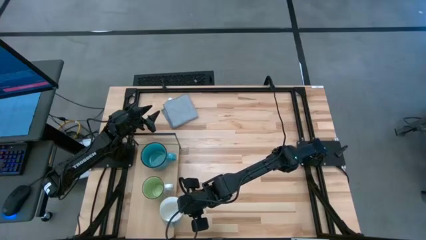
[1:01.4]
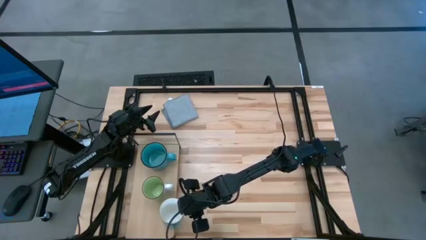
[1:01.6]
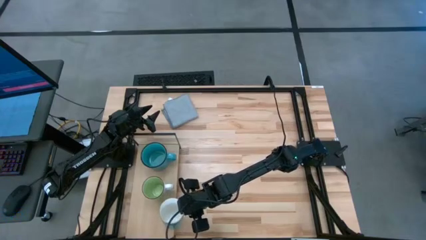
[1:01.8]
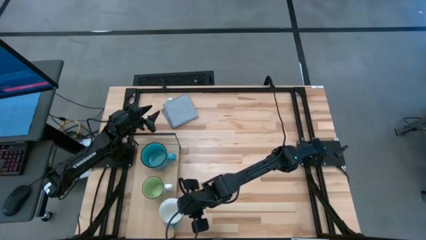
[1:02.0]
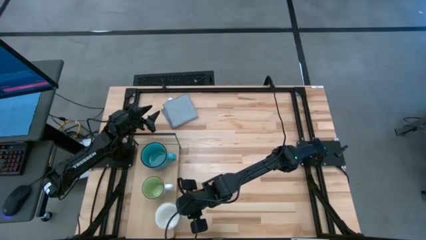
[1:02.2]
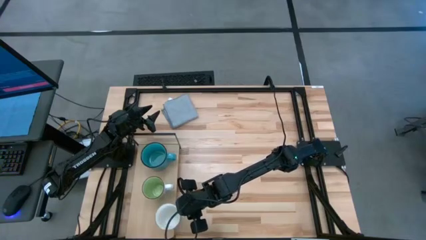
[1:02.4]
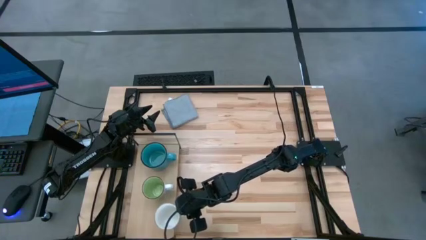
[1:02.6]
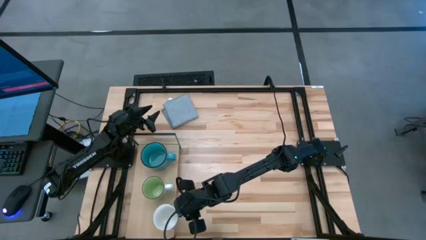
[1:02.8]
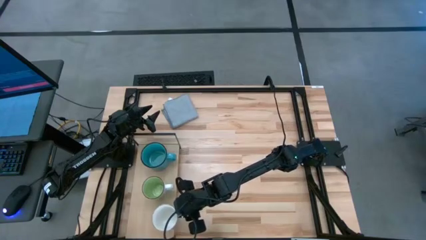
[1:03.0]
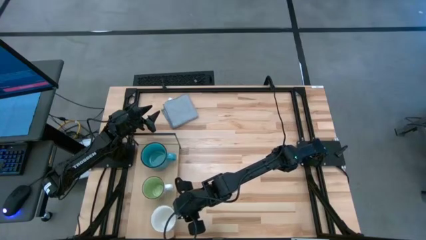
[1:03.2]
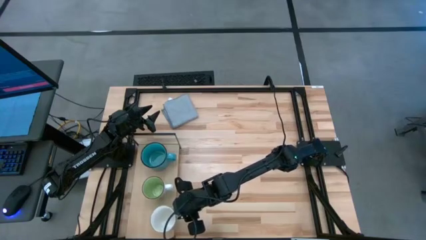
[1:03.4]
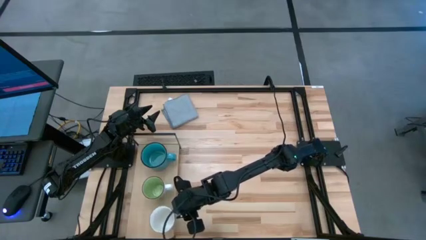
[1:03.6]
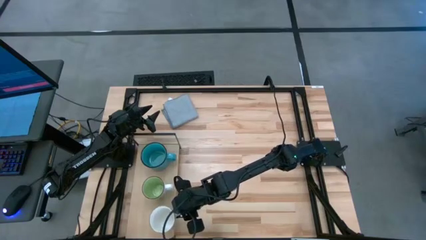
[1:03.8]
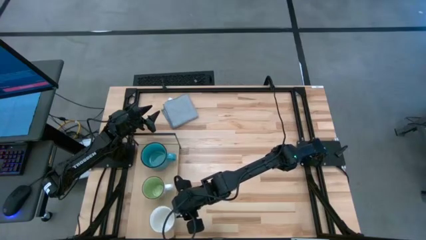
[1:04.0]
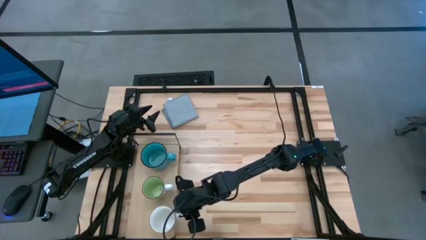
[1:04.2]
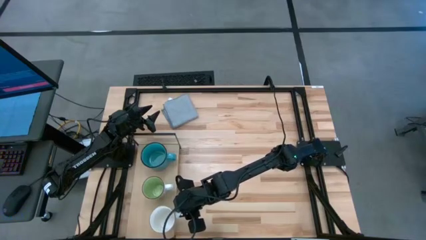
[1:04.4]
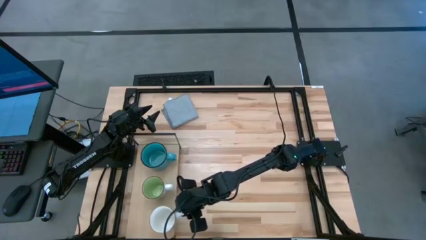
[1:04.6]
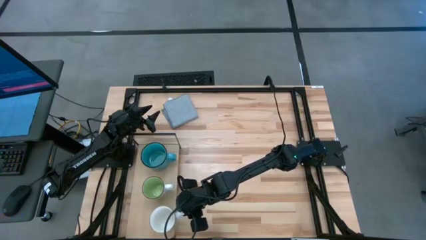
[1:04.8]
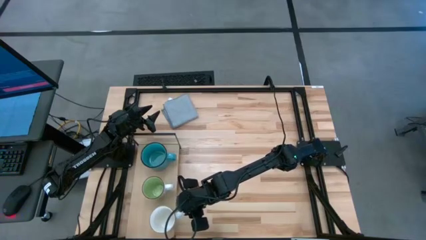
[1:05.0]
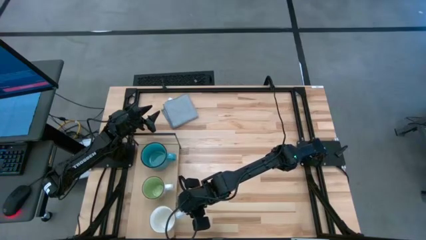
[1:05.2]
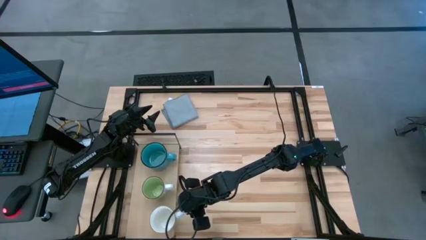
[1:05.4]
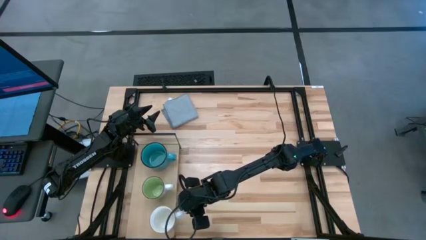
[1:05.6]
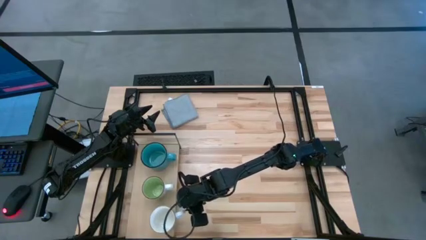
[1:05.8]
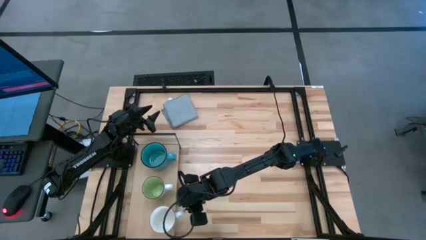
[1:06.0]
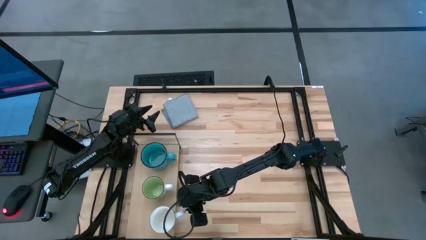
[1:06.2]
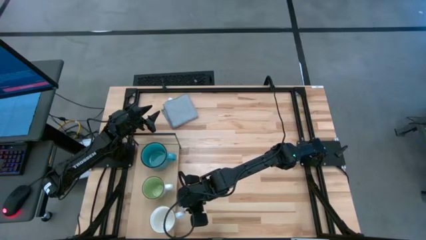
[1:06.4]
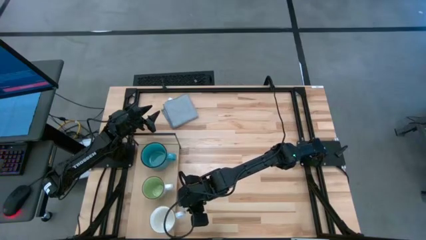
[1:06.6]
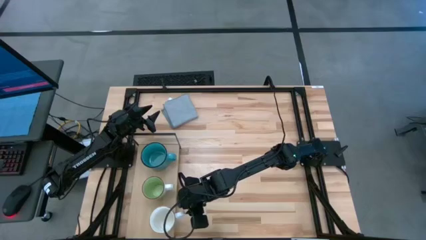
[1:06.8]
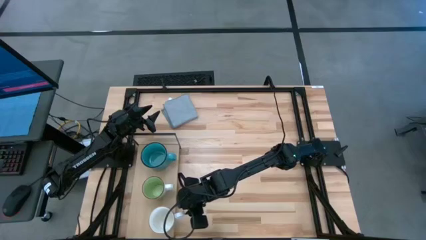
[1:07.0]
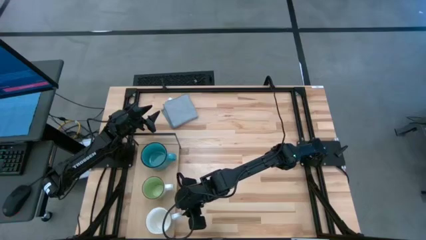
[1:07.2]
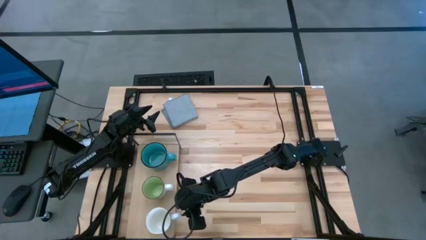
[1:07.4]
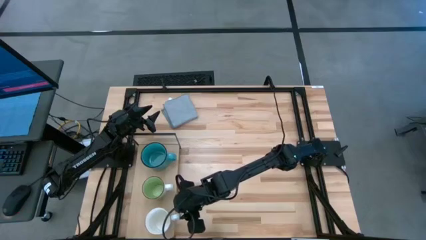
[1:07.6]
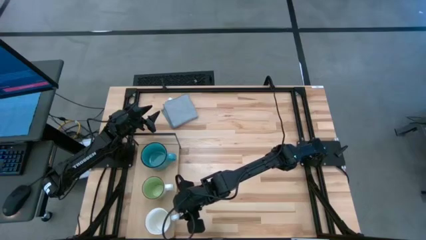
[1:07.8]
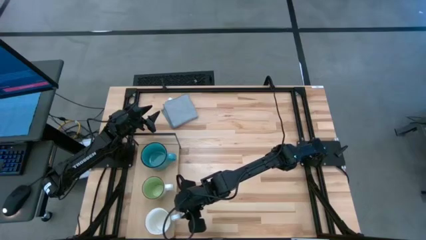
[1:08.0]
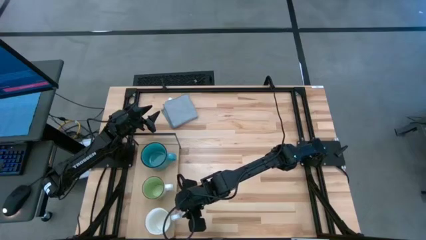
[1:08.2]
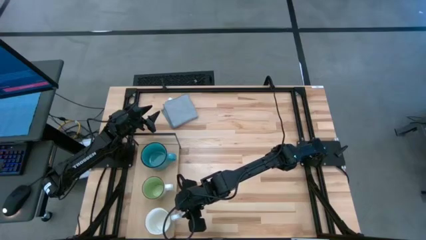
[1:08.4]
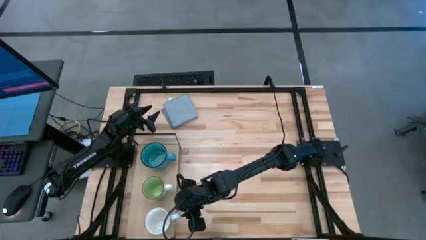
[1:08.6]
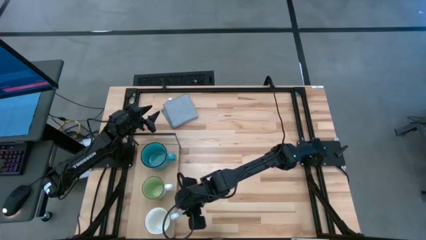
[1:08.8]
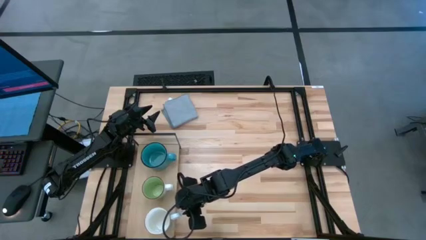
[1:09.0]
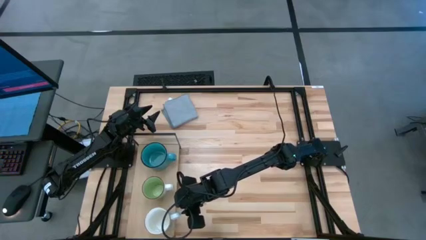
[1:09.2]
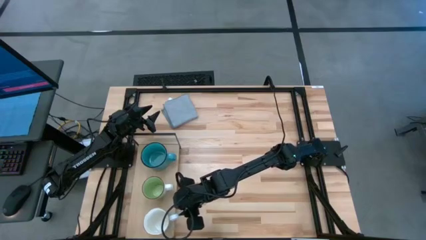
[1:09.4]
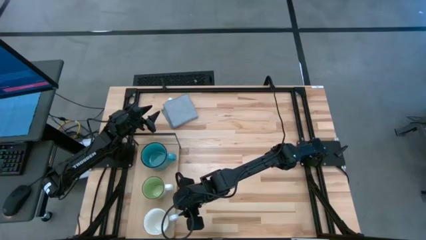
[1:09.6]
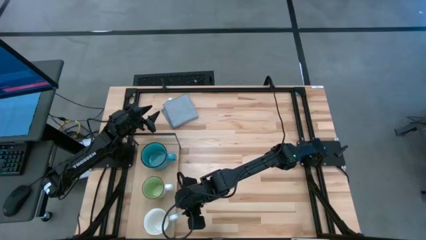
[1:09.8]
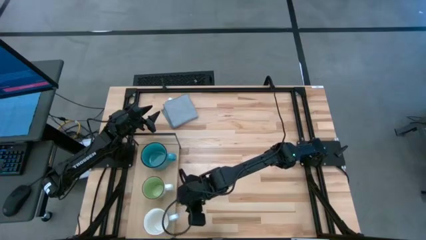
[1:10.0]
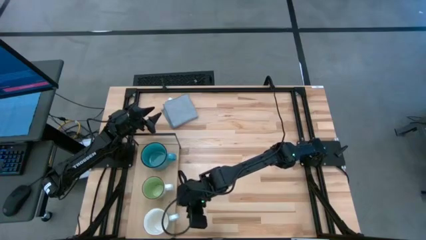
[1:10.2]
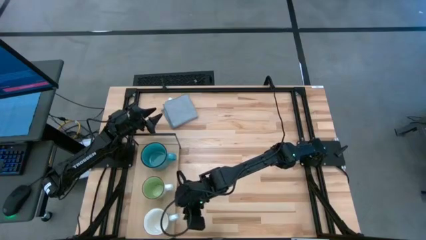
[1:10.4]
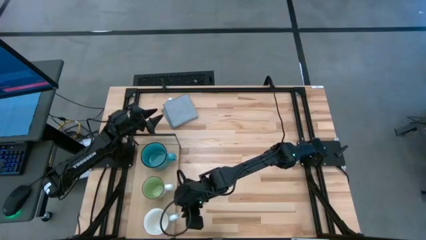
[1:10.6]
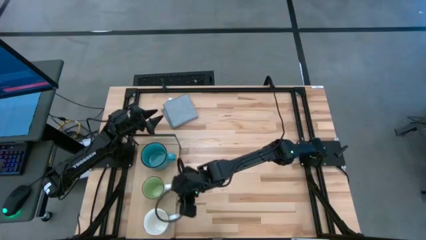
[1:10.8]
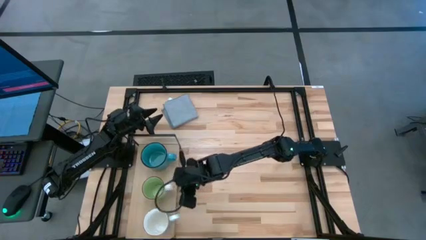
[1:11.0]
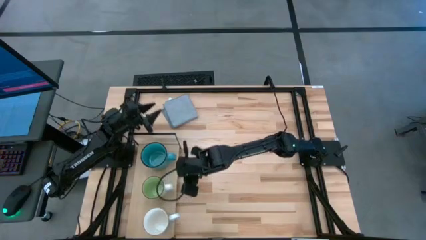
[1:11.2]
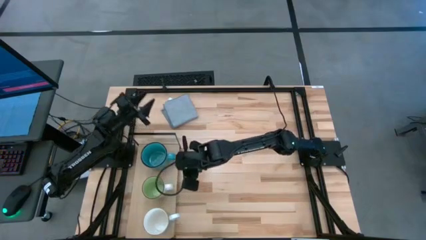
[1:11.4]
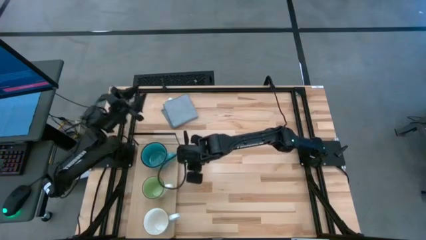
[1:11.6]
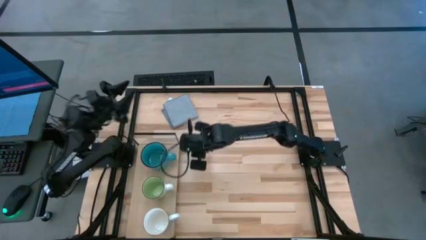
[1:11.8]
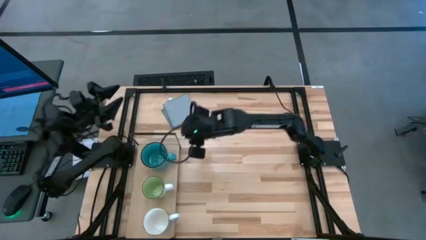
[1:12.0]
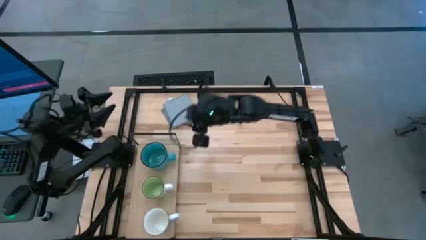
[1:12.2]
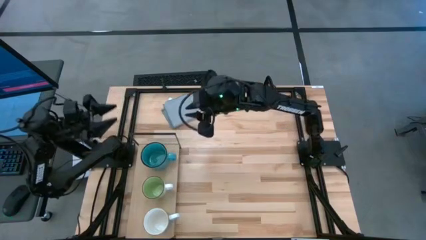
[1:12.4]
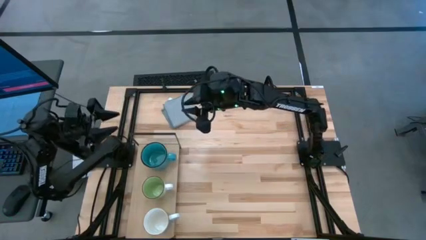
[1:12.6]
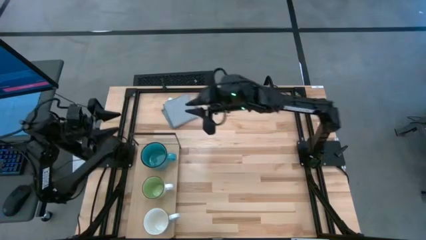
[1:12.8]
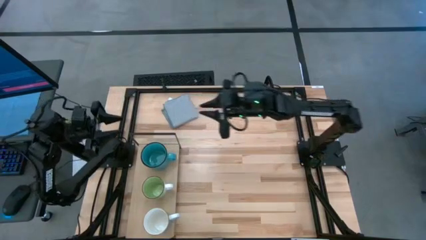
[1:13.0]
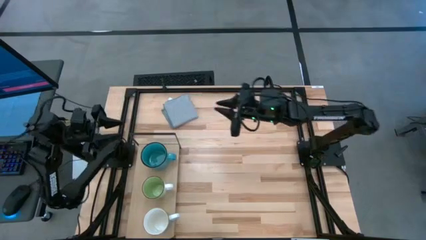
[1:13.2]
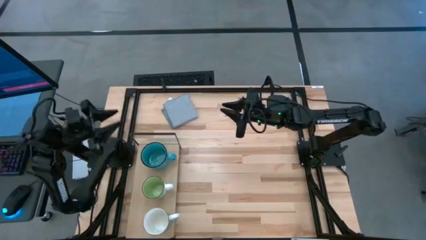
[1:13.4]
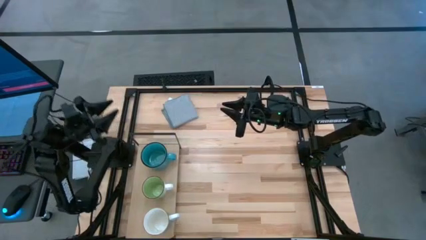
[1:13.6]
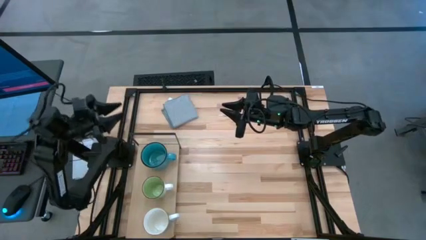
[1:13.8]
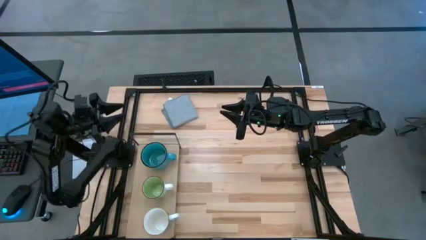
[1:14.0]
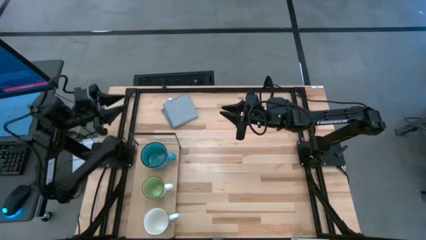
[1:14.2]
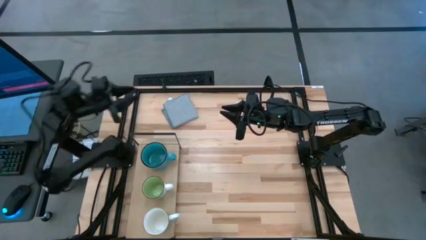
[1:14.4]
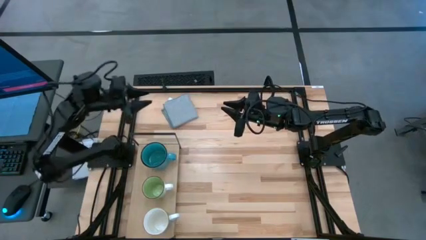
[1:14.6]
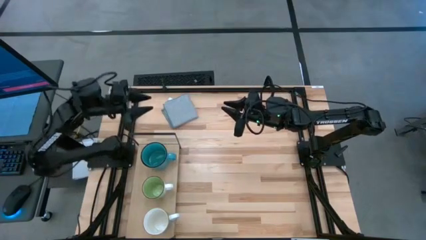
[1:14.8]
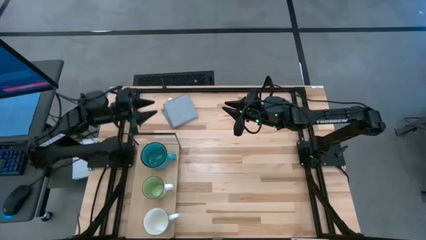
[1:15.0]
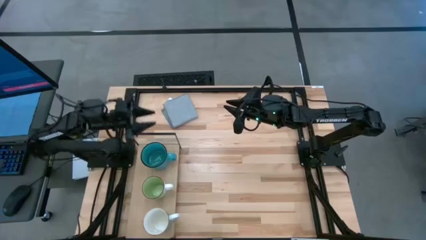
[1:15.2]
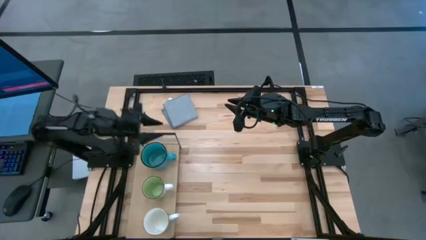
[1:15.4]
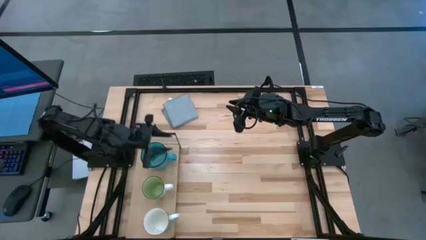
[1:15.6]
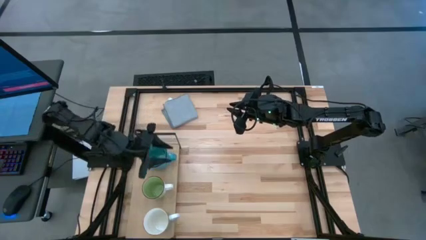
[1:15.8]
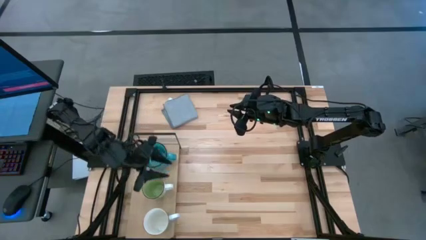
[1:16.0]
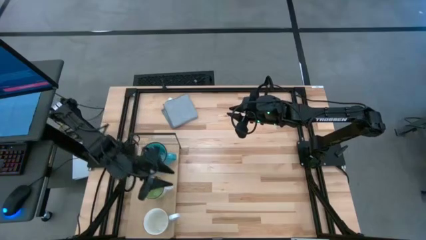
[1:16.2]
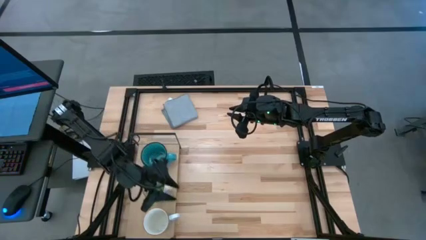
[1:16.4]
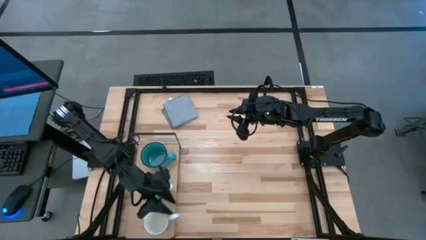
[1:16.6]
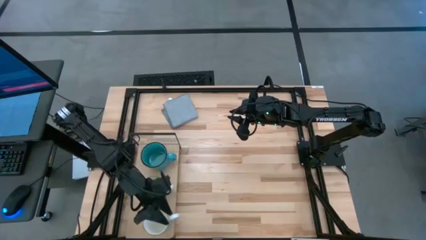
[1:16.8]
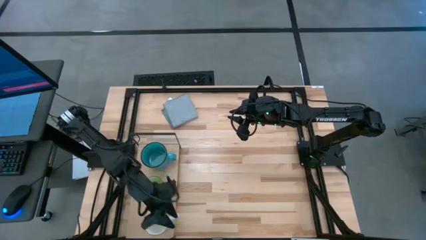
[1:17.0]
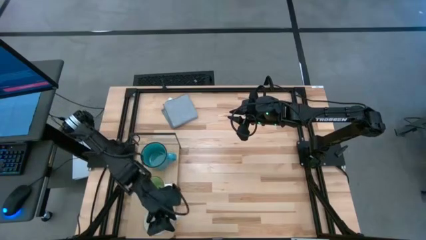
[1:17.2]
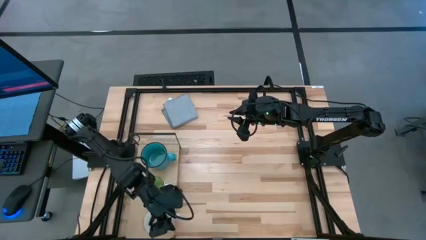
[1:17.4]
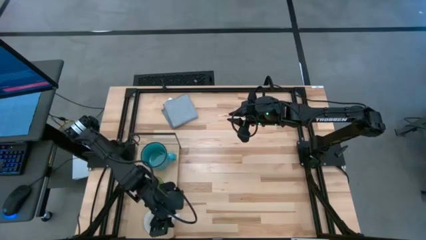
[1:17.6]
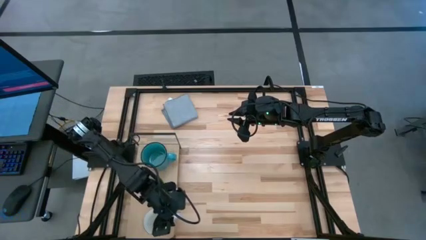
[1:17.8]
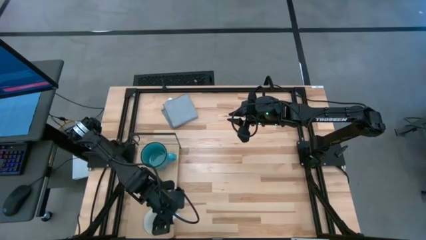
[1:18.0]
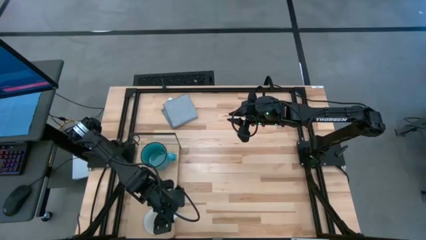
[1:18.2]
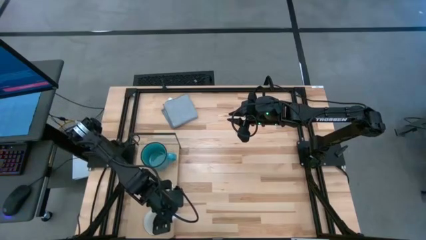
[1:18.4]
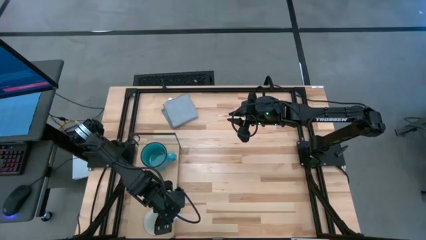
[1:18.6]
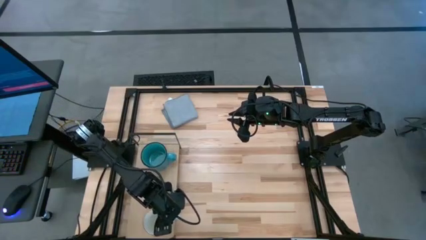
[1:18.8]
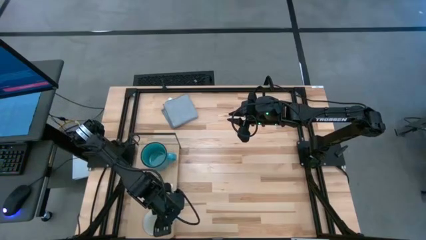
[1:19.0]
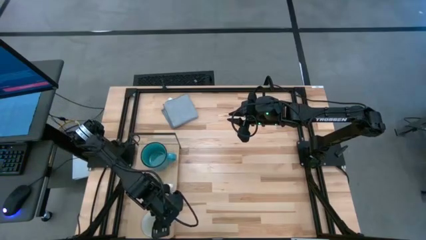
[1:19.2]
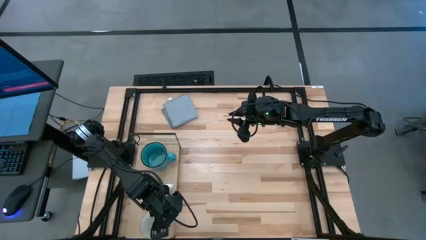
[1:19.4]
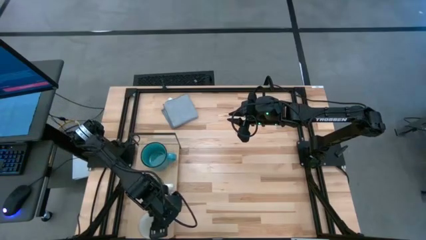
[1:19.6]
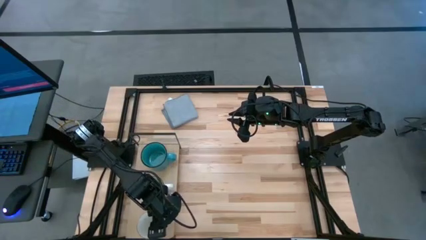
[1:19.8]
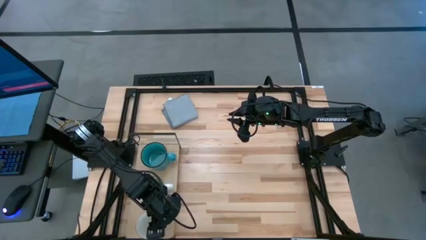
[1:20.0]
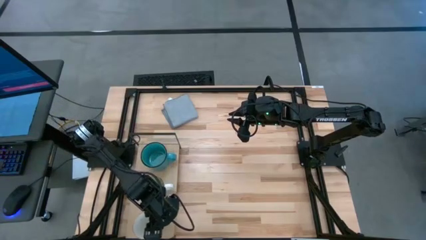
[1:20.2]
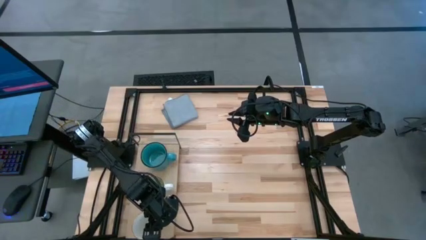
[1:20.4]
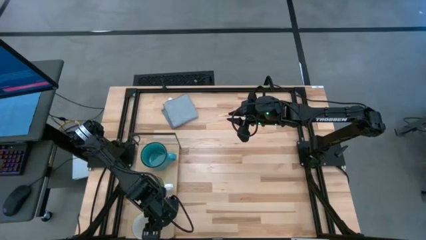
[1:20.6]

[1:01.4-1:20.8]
Task: Stack small to large cups/mugs on shelf
Put the blue mug on the shelf
